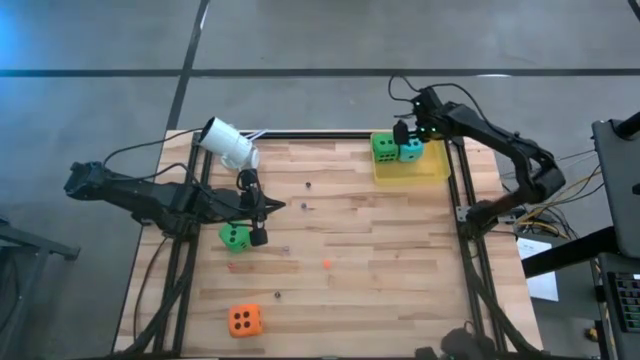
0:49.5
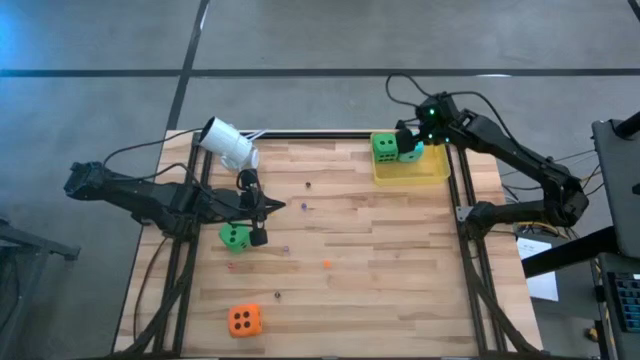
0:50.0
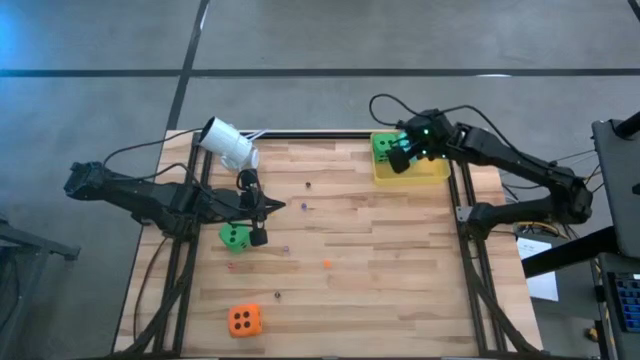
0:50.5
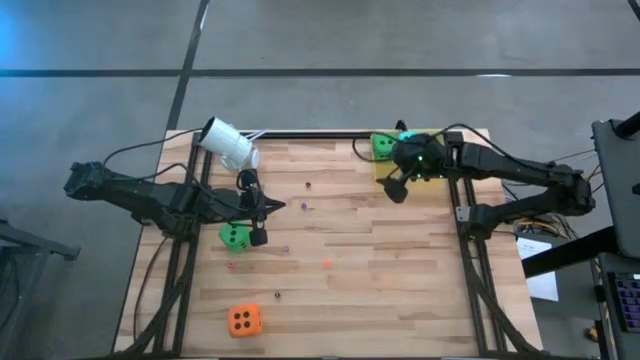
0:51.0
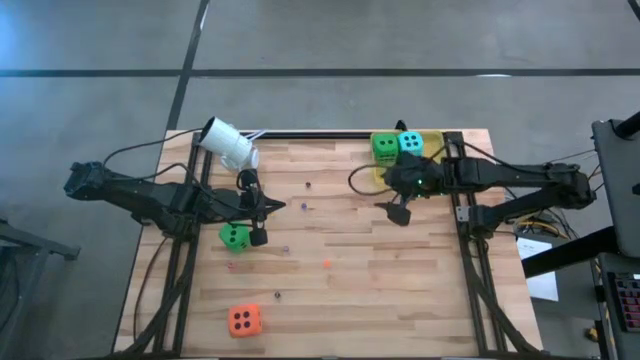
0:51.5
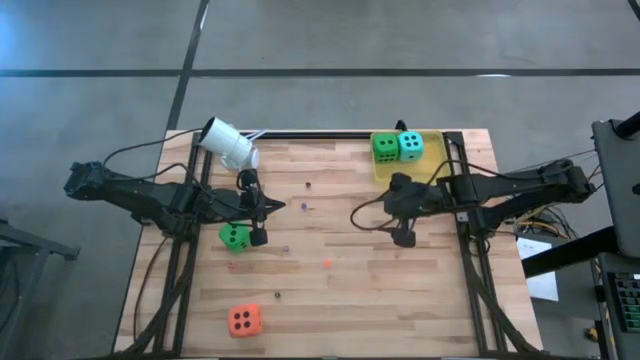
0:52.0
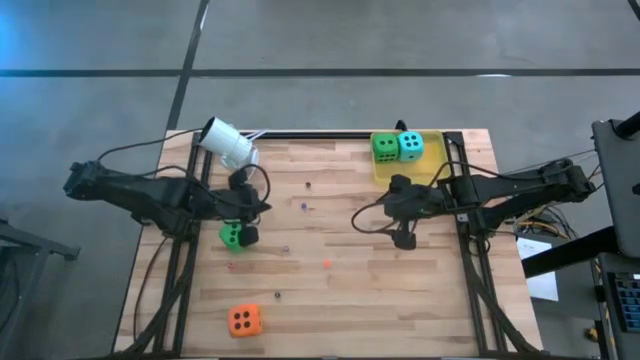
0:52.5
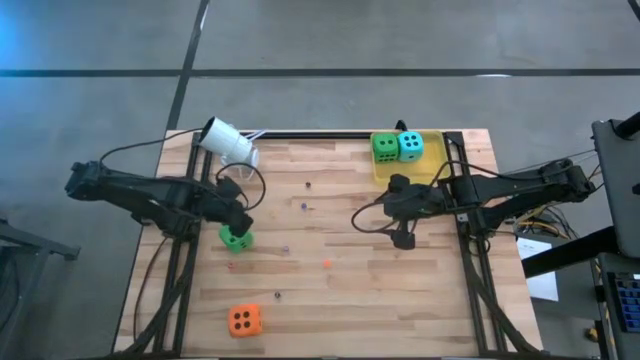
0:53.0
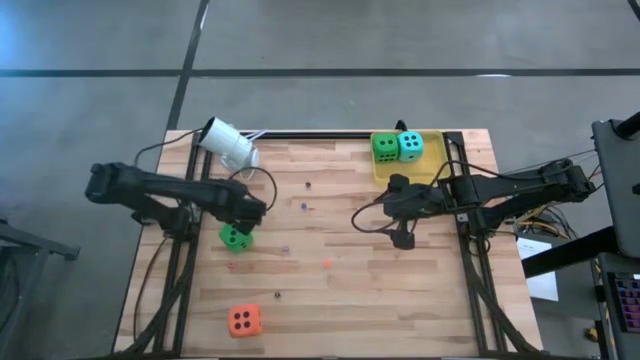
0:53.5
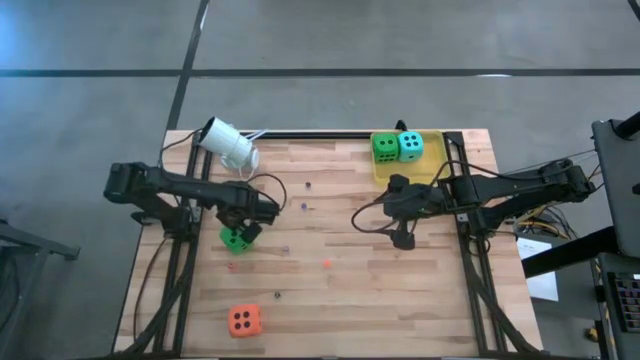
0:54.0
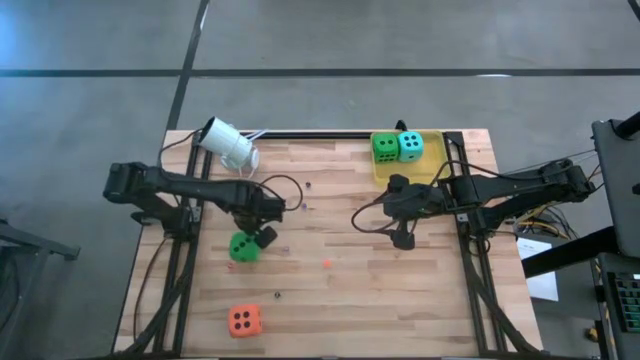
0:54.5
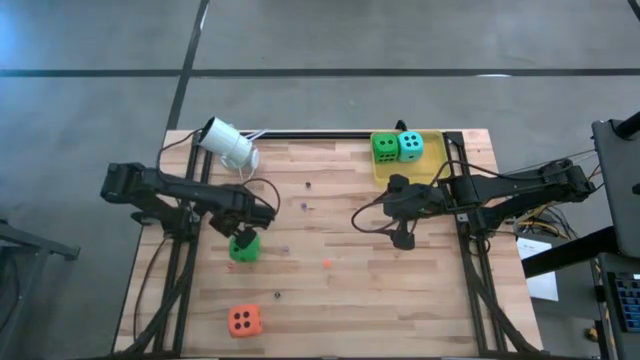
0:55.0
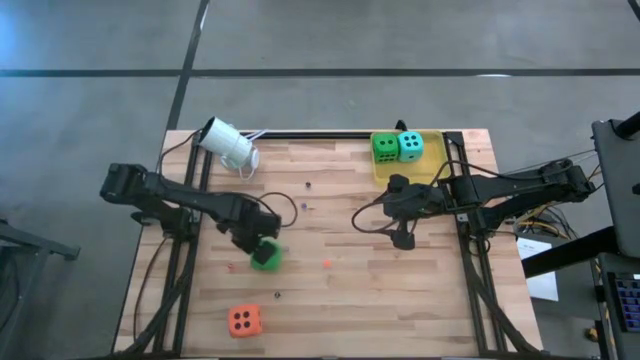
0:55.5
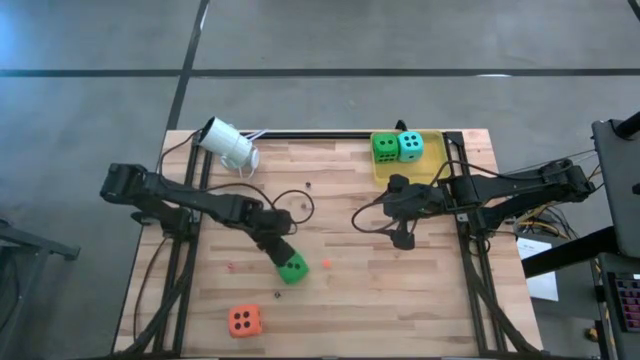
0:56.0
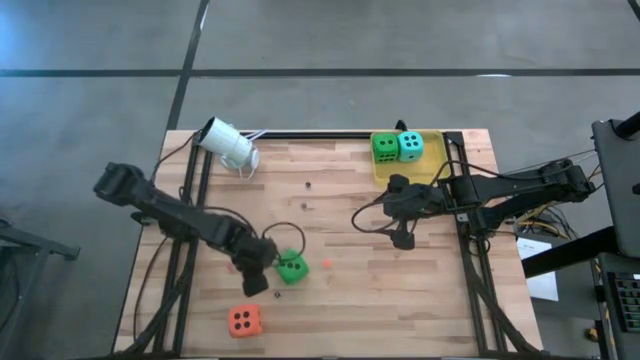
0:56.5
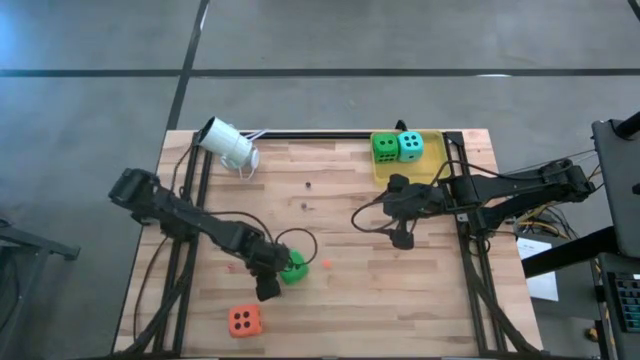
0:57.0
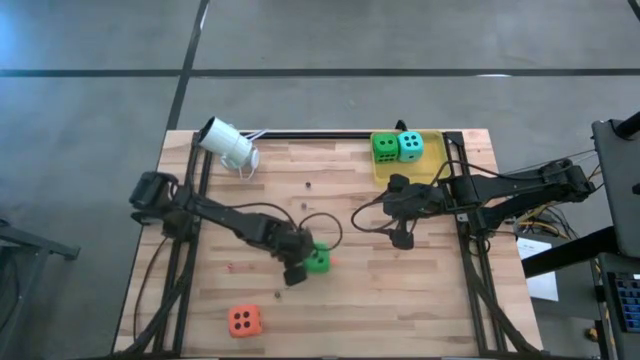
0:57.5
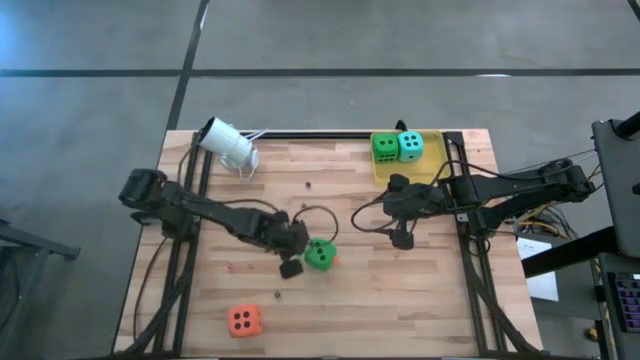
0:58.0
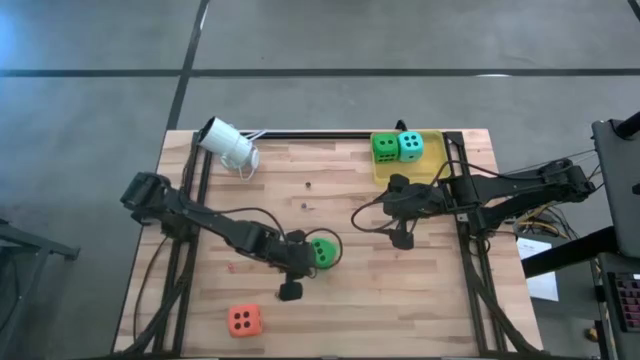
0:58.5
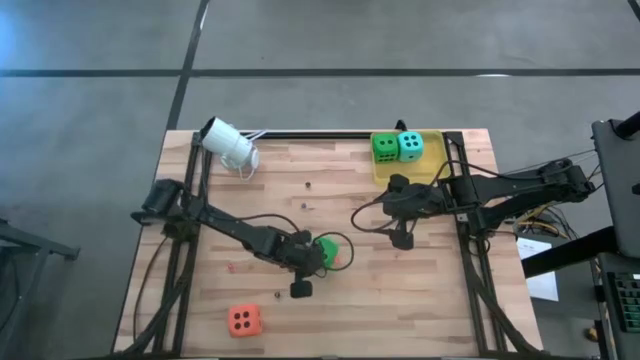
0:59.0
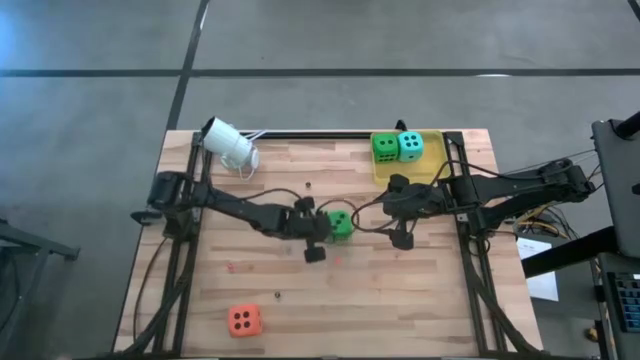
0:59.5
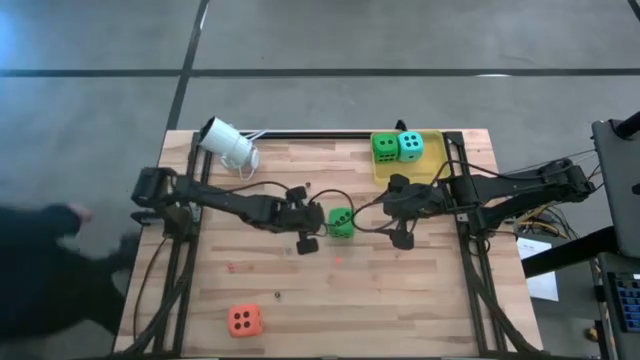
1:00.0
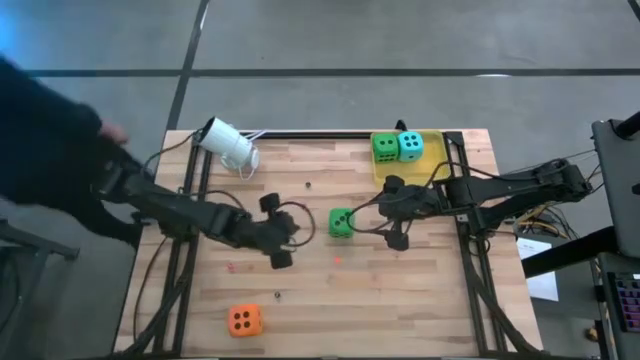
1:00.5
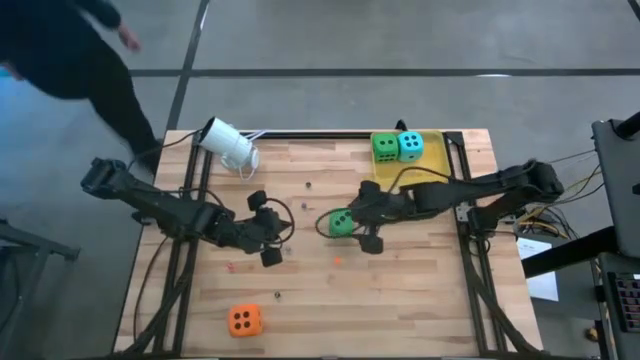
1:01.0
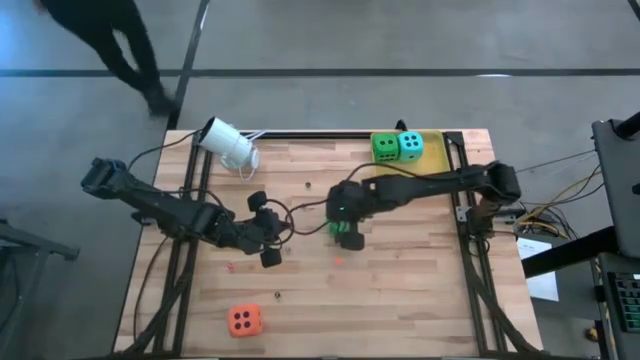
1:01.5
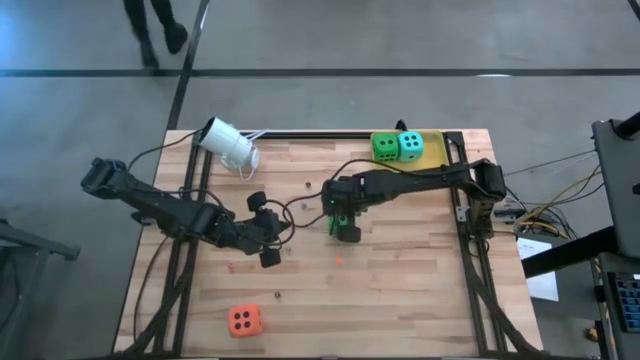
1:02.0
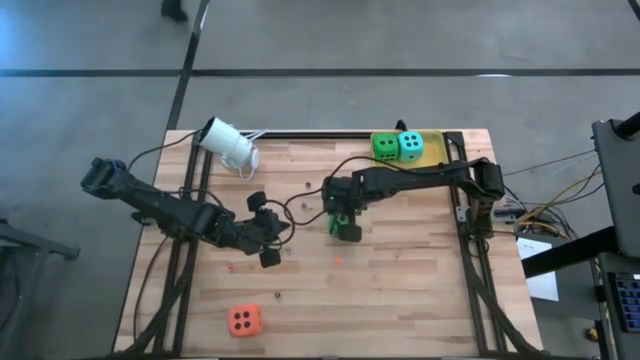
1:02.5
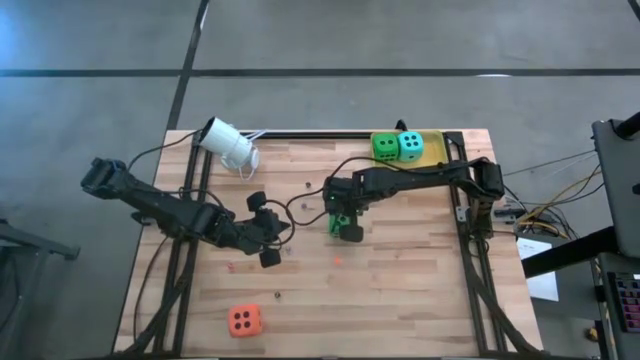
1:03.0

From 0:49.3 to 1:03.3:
Task: Pick & Place Dice
Put the large green dice into the yellow transparent bin

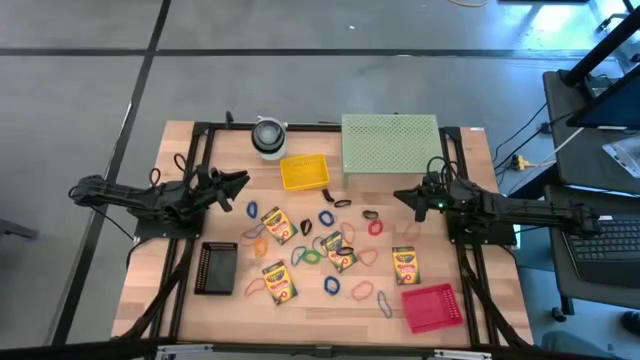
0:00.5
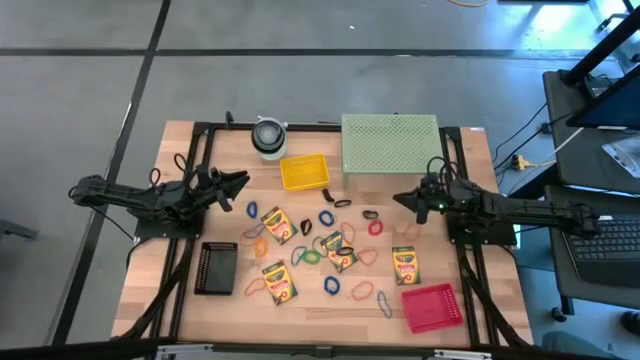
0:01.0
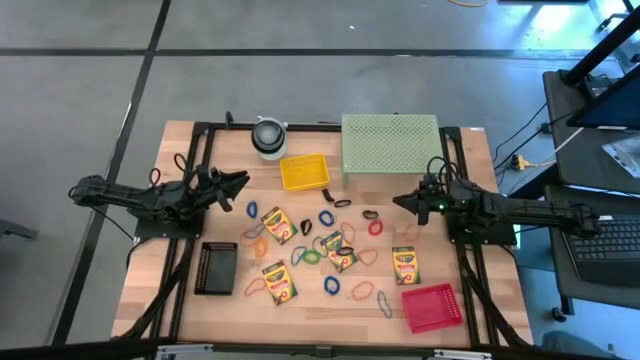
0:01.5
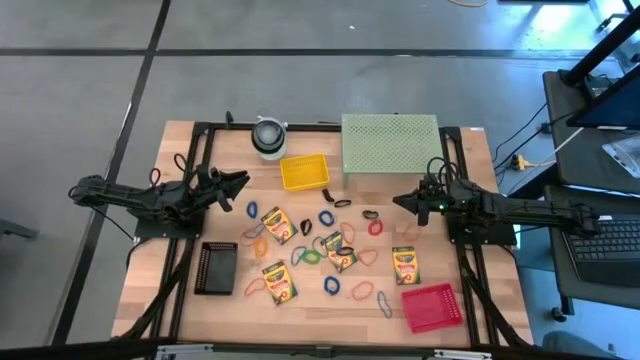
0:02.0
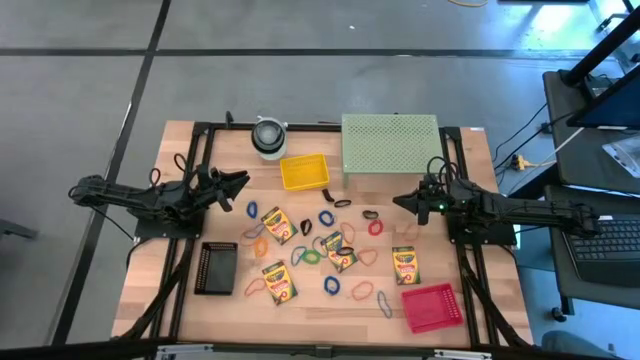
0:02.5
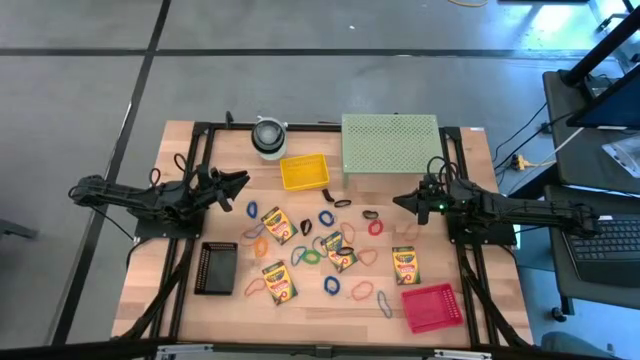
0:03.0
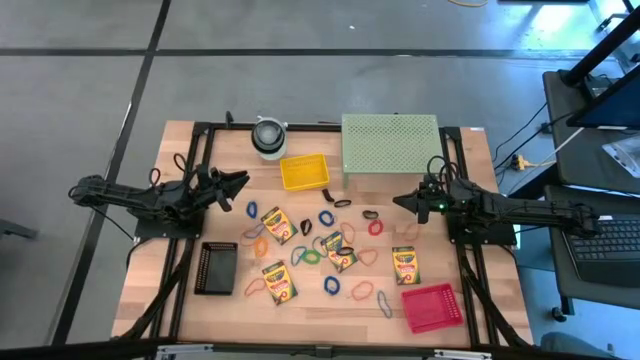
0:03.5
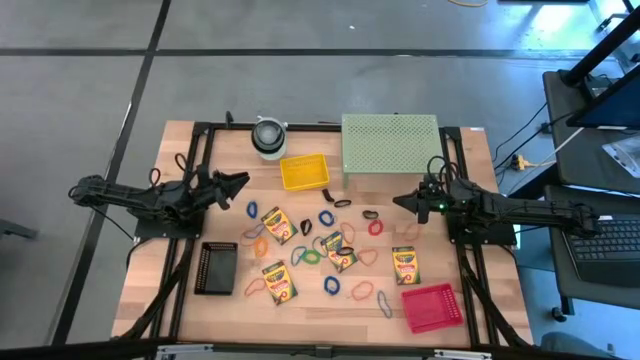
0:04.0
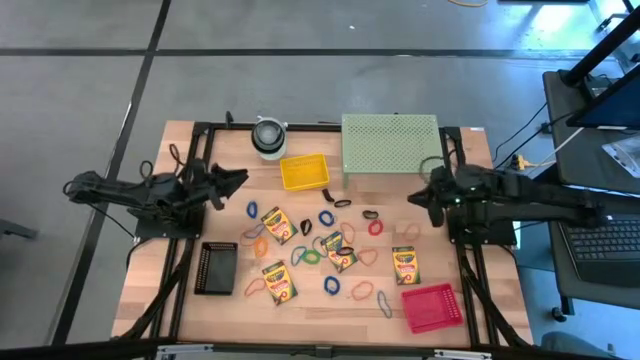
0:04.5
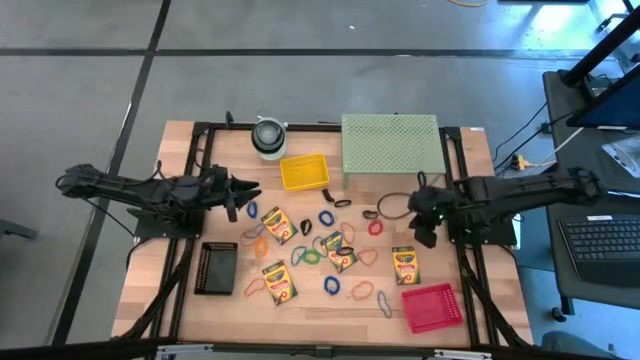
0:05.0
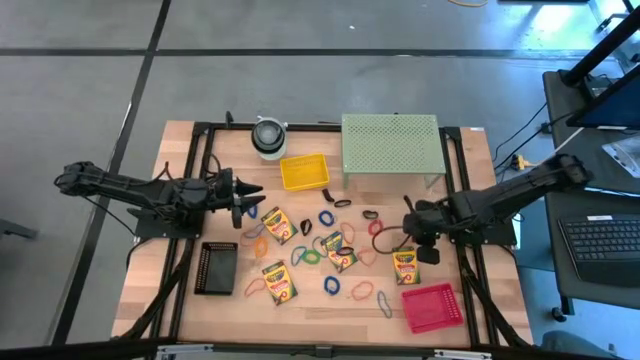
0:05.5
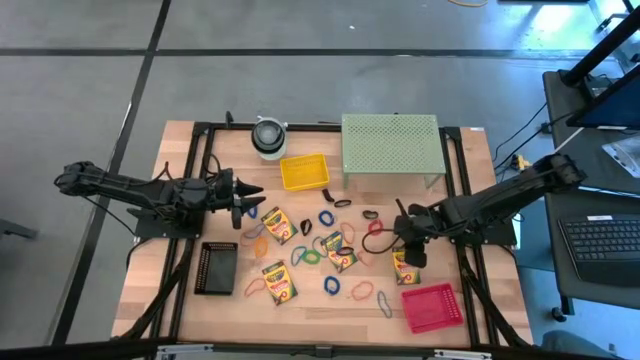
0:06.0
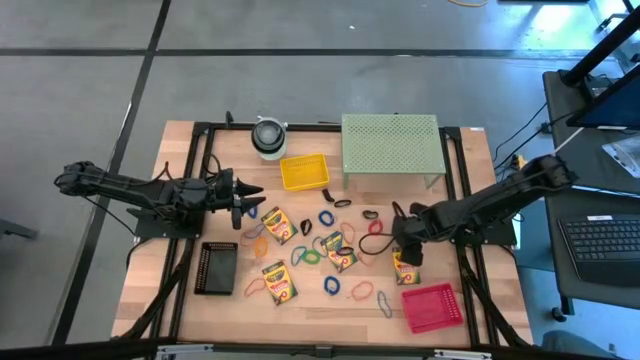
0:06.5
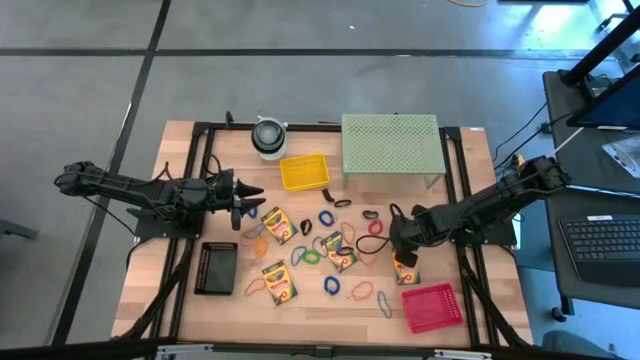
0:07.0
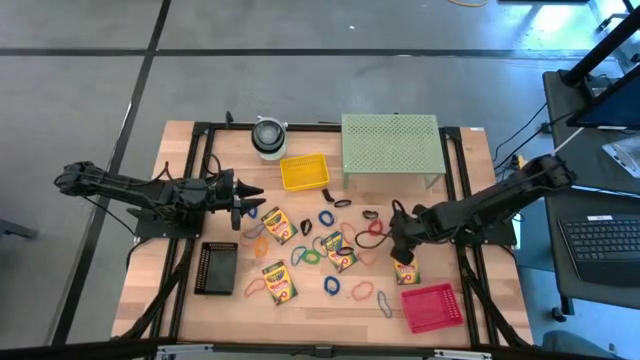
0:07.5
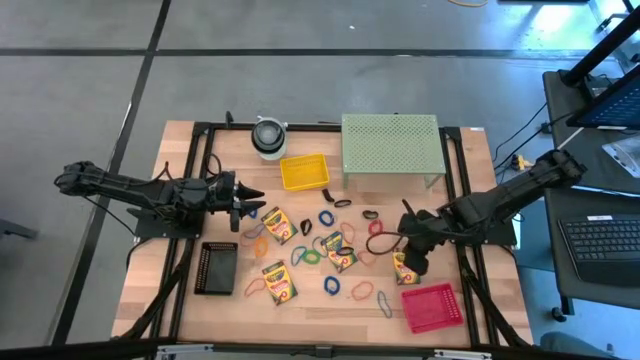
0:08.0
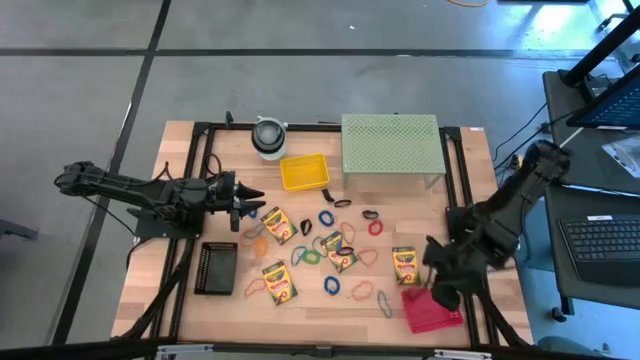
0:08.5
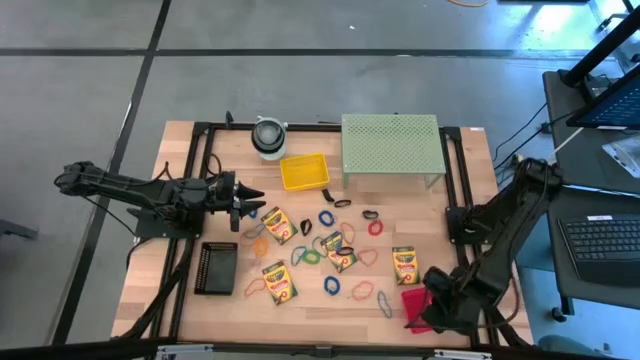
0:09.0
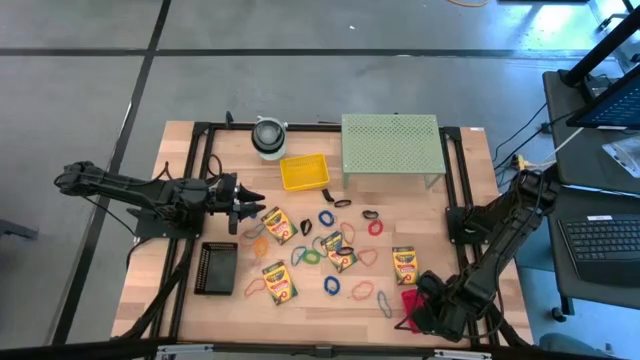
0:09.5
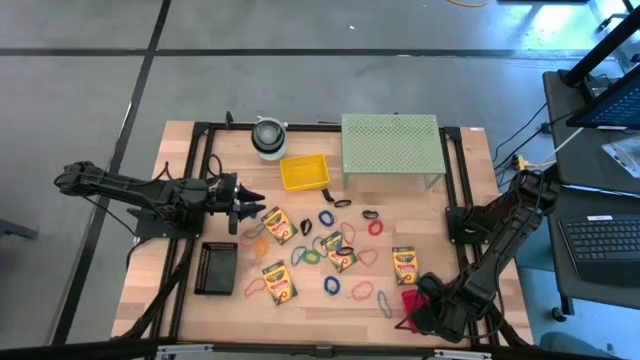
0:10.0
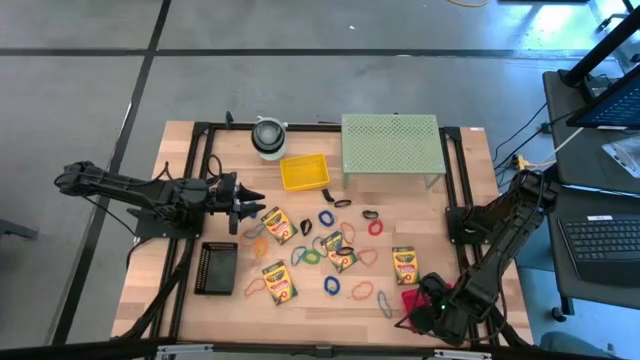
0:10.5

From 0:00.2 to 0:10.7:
Task: Pick & Place Office Desk Supplies
Put the orange rubber band into the red bin
